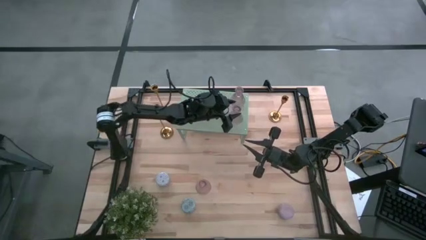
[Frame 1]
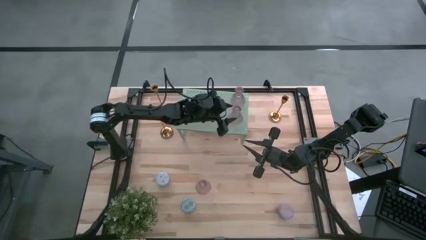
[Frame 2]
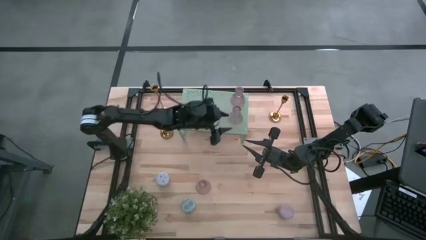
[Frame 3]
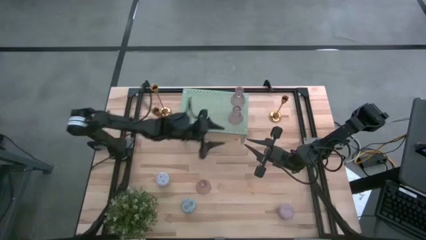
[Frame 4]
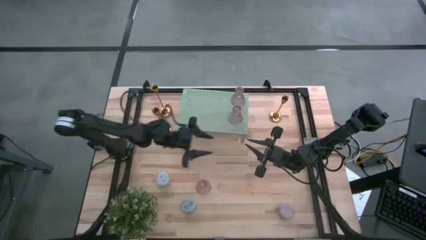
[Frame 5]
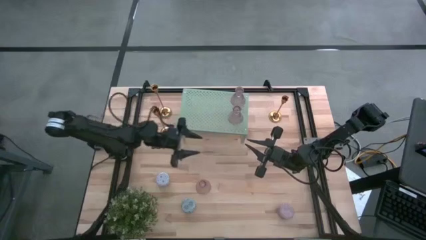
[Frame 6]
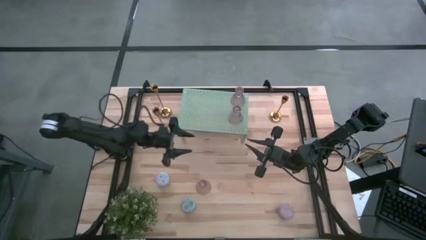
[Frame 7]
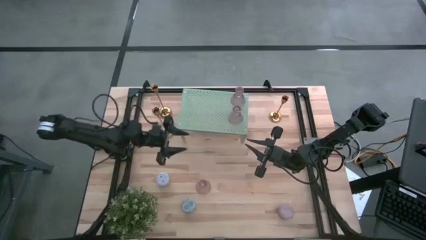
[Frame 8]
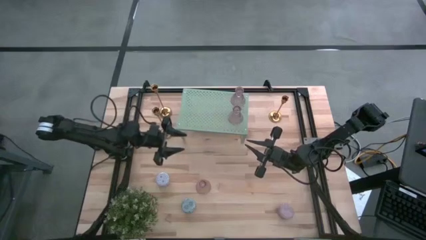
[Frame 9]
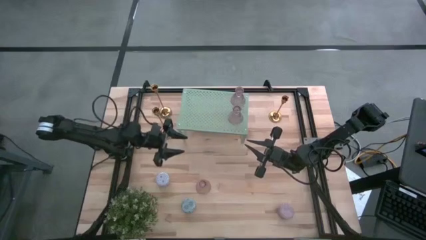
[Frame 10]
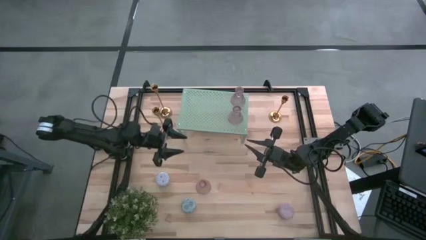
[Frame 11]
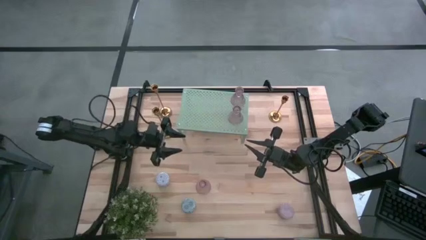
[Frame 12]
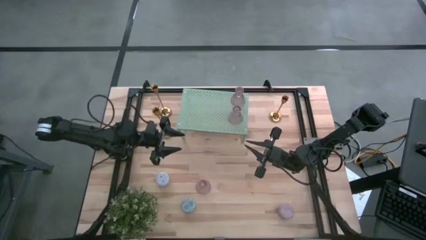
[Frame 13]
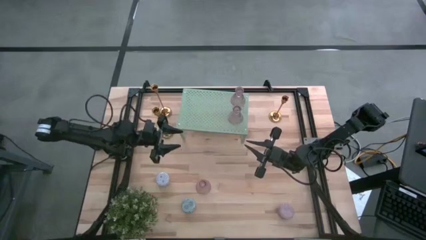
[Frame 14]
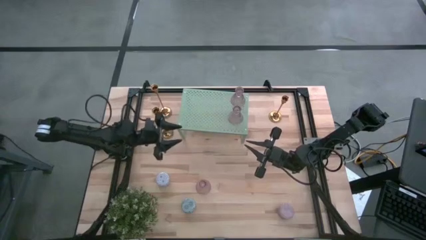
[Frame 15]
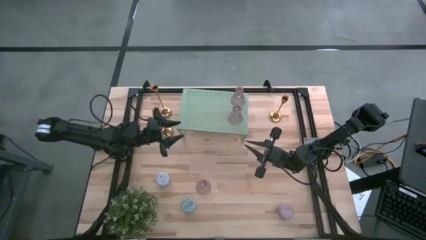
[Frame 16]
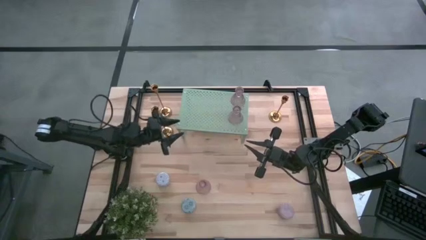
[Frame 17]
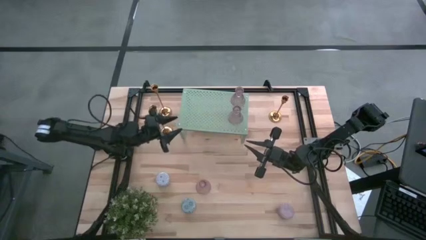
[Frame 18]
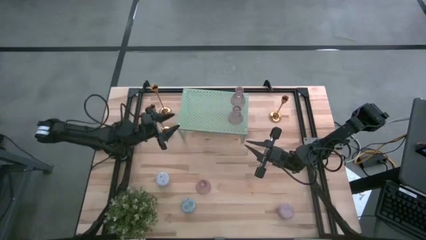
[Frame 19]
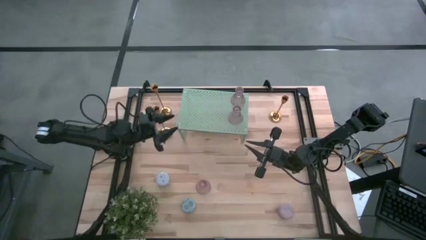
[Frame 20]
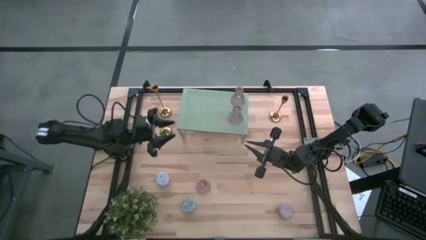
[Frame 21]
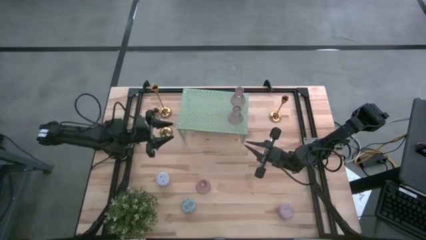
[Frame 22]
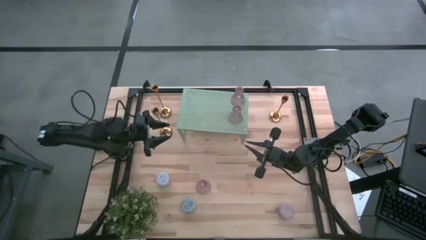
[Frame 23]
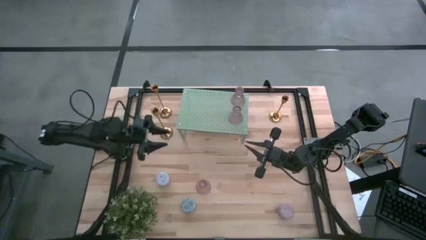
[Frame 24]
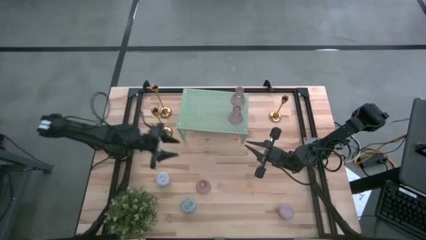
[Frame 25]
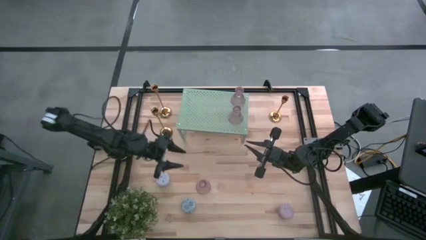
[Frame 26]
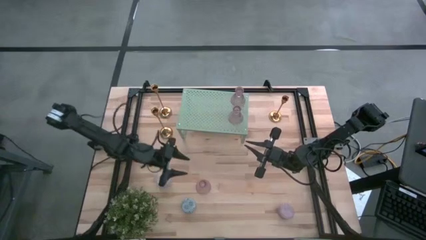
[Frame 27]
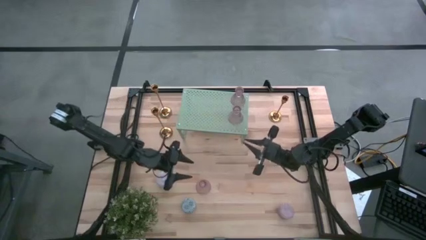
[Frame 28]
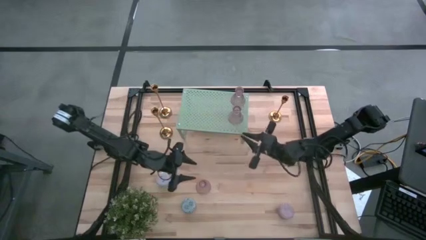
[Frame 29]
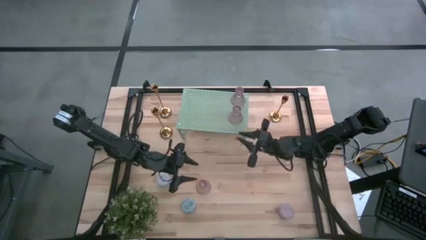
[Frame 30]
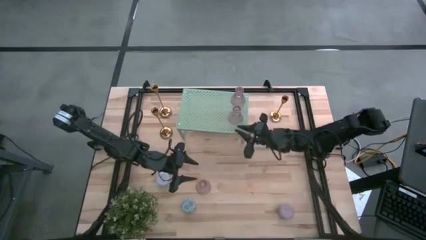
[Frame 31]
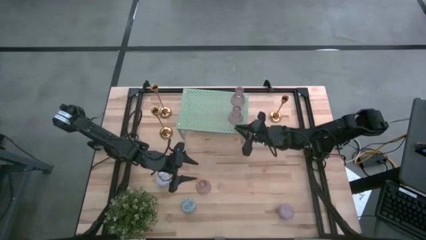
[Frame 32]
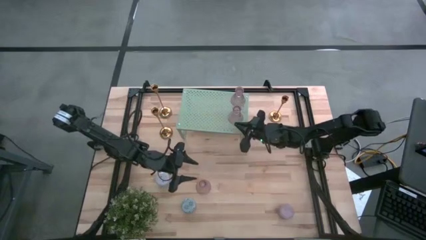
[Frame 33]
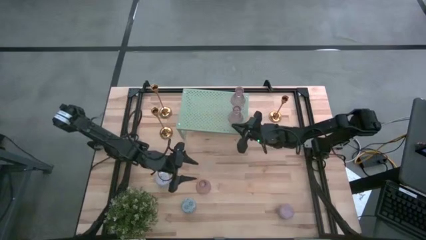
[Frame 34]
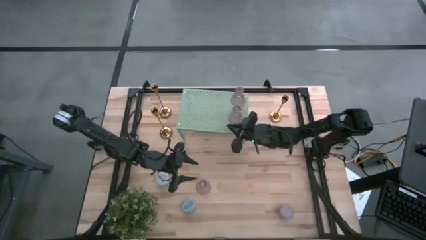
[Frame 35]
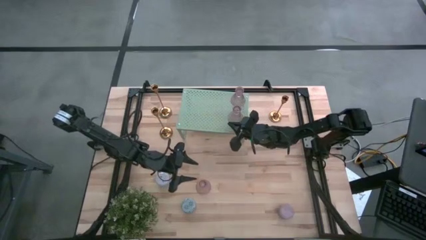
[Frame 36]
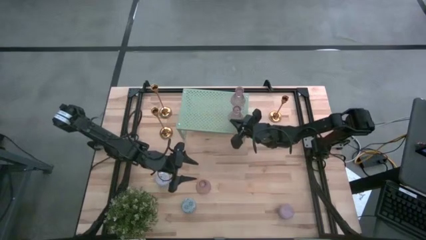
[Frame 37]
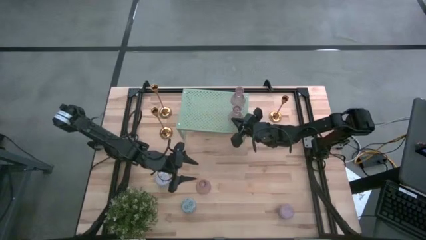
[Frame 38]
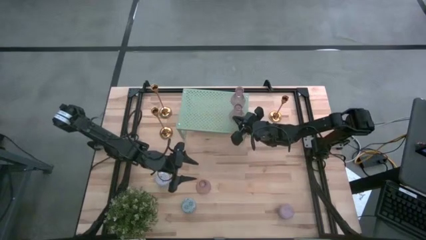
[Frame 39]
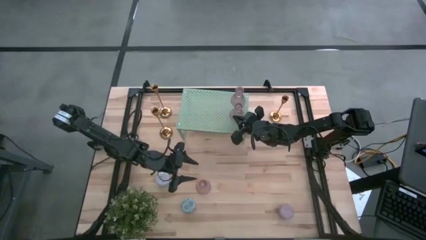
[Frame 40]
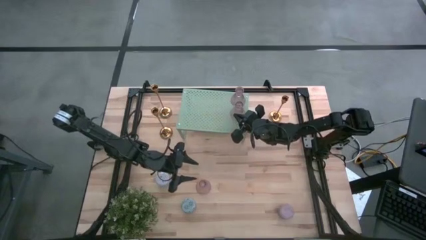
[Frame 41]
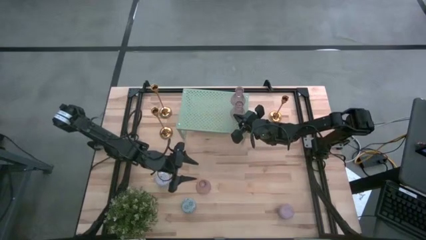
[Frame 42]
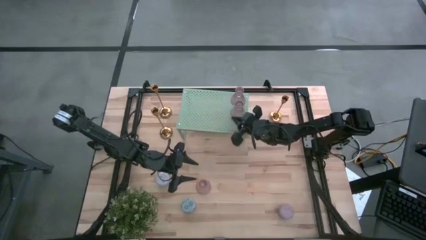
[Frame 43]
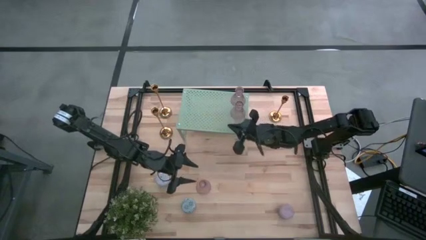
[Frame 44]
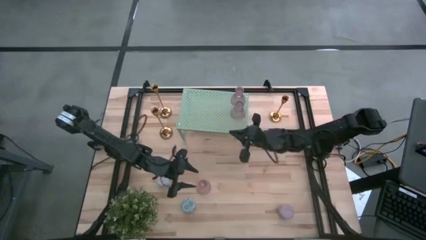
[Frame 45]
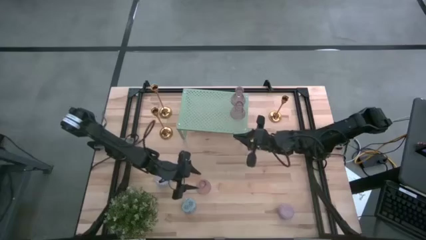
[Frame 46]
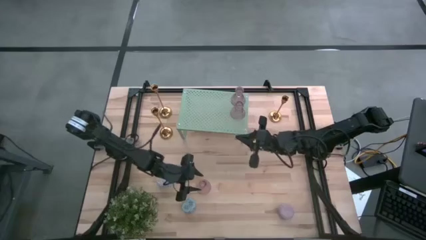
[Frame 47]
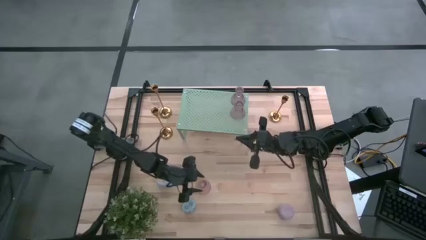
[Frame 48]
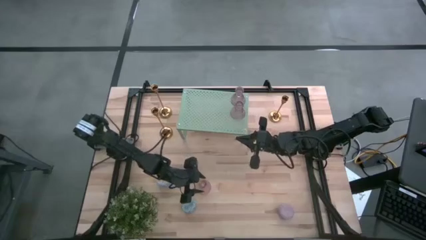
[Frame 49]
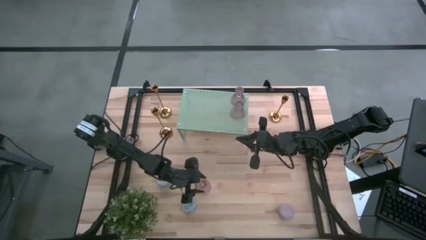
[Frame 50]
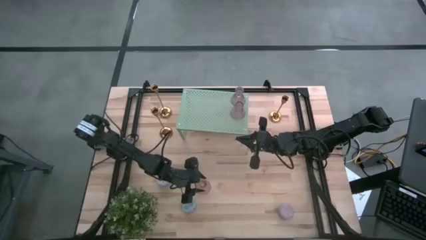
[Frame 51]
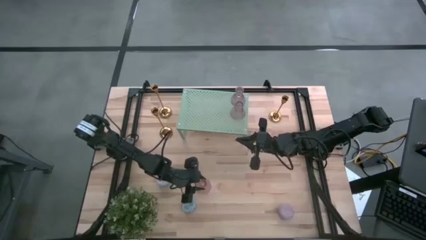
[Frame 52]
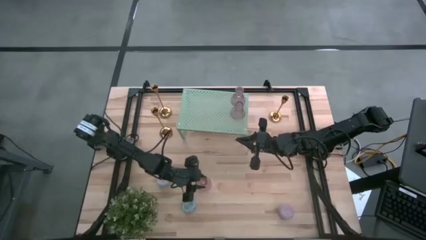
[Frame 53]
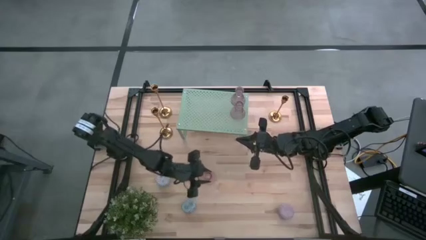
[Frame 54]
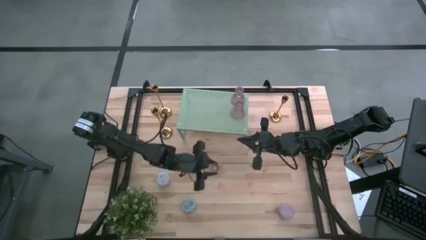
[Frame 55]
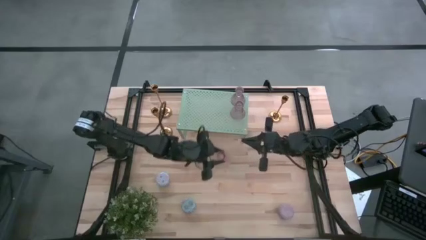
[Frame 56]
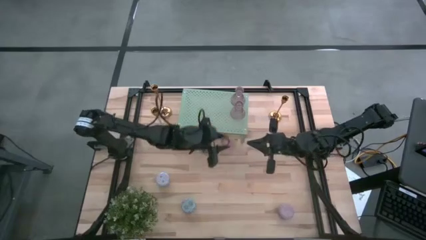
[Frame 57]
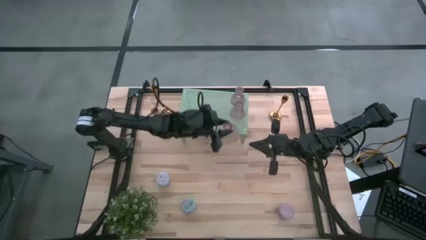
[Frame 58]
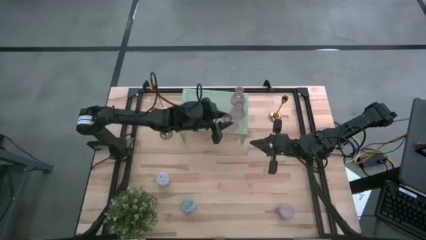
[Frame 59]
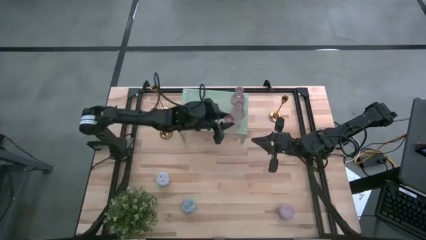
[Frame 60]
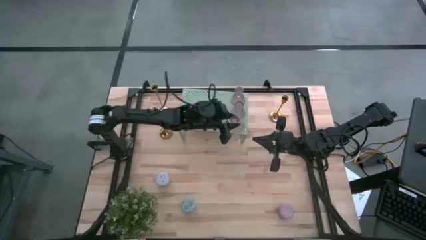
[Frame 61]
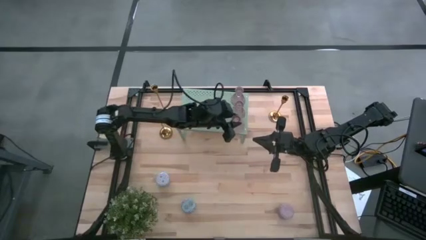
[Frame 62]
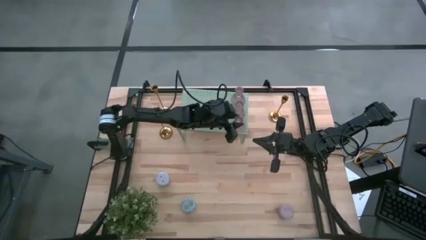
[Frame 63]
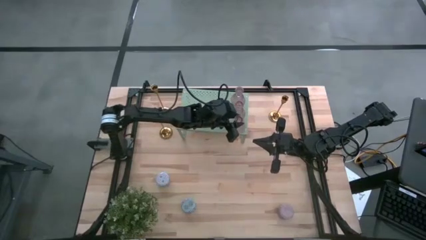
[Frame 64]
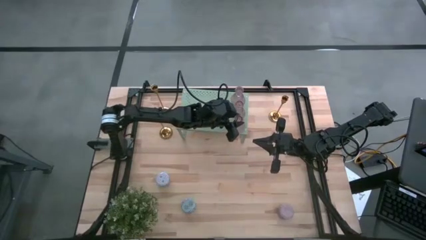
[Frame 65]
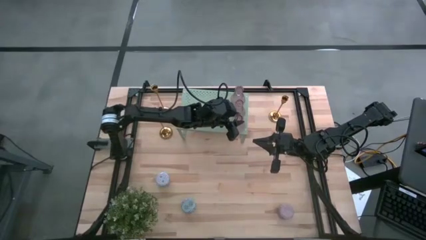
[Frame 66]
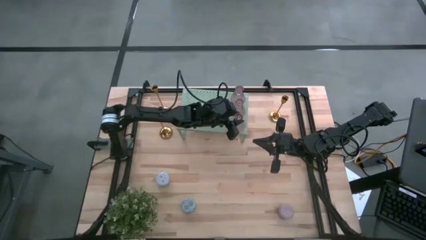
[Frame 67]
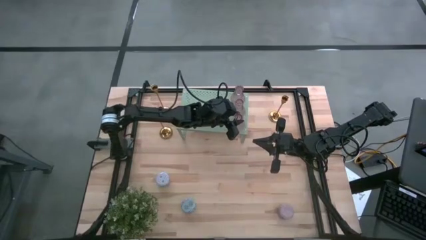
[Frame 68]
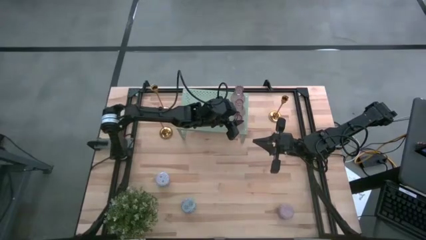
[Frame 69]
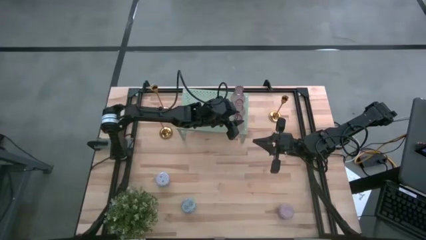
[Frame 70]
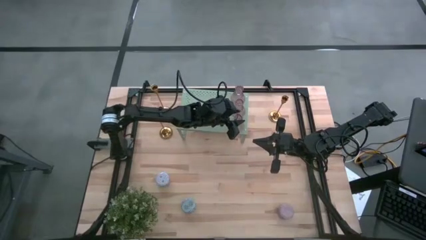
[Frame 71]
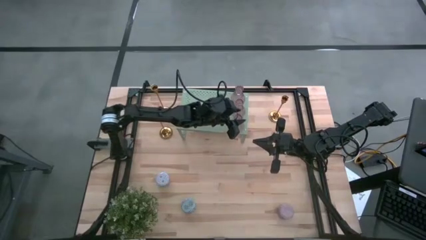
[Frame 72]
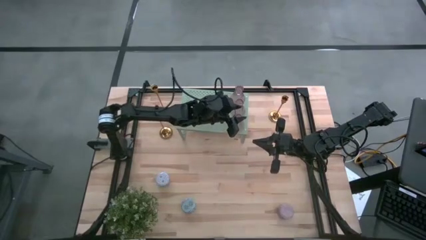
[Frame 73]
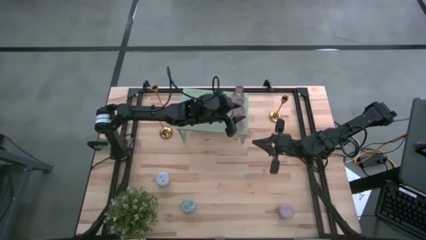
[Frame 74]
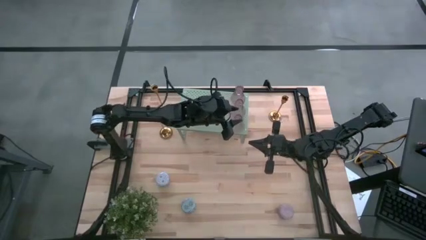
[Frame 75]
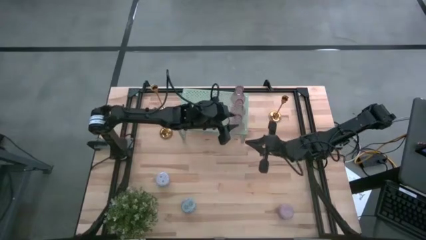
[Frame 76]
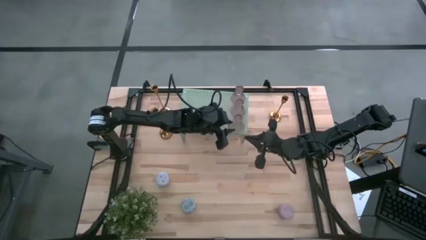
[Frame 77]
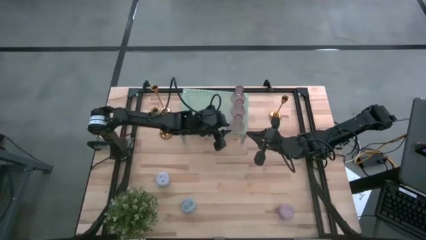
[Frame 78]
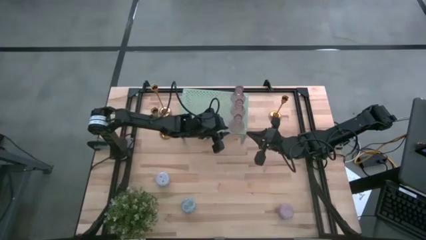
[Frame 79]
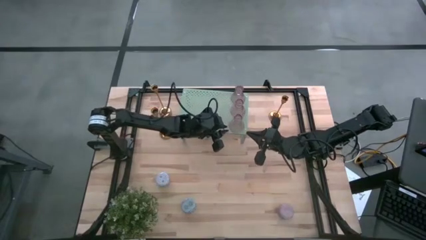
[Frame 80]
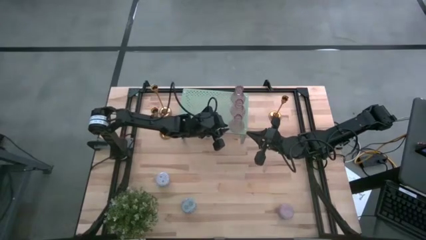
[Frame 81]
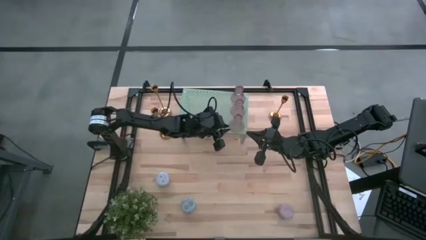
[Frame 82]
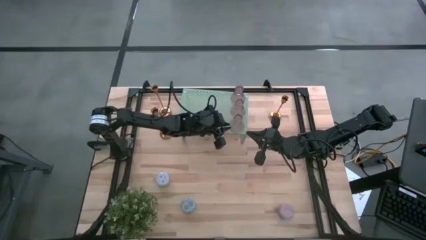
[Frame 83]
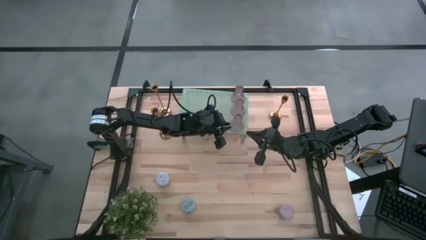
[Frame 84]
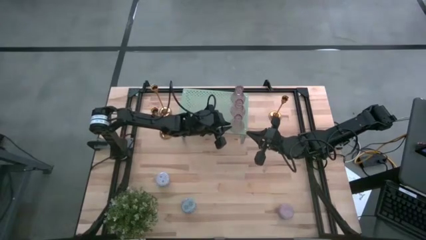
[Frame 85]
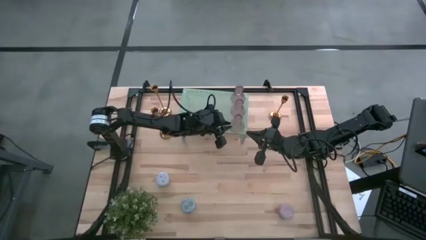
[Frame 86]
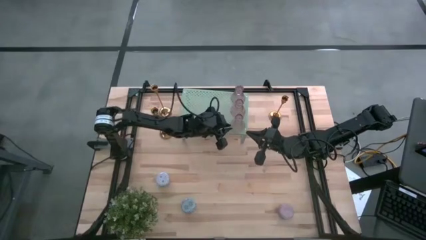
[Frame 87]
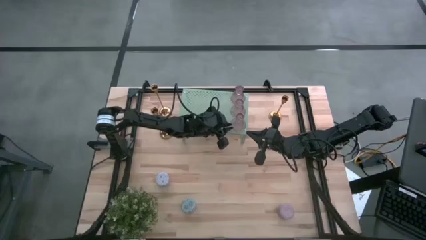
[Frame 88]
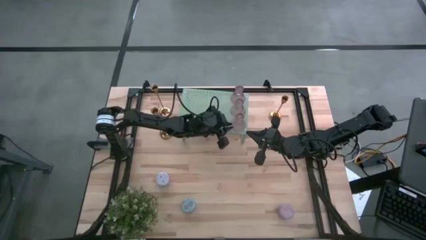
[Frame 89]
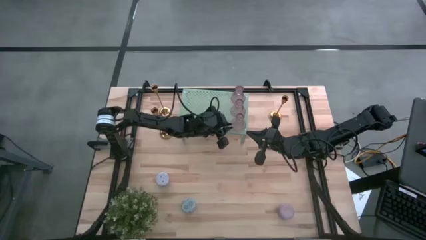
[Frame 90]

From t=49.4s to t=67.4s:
Task: Pick & Place candle stick holders
Put the glass candle holder on the shelf aligned with the other glass candle holders
